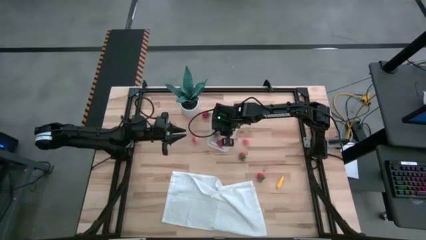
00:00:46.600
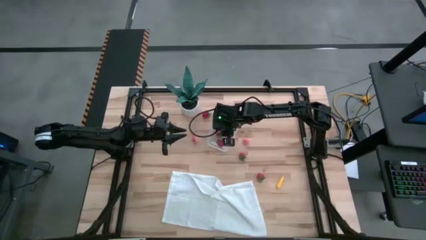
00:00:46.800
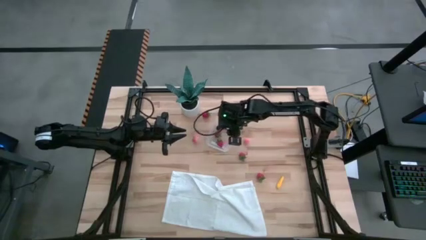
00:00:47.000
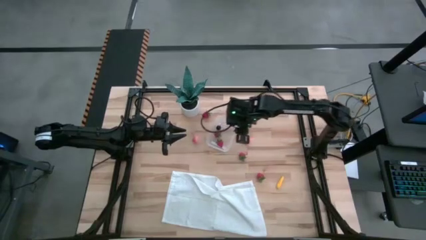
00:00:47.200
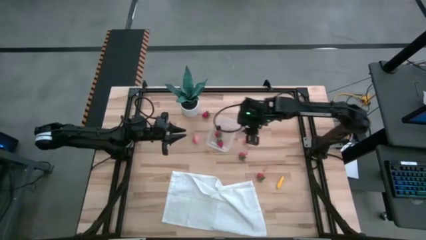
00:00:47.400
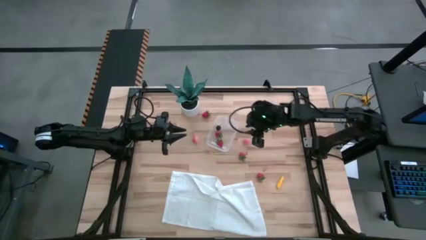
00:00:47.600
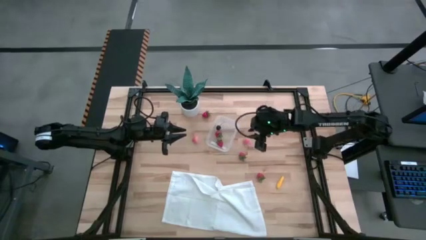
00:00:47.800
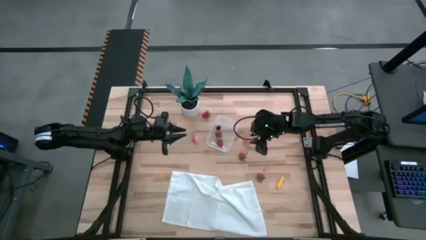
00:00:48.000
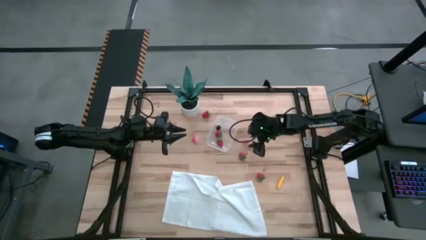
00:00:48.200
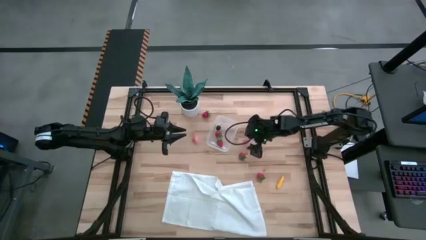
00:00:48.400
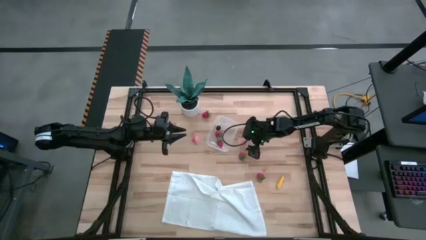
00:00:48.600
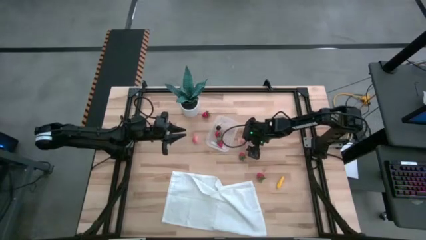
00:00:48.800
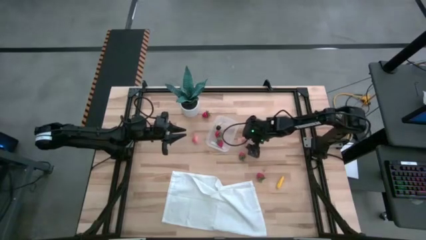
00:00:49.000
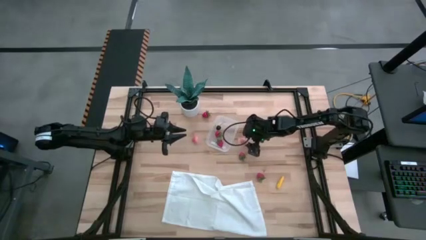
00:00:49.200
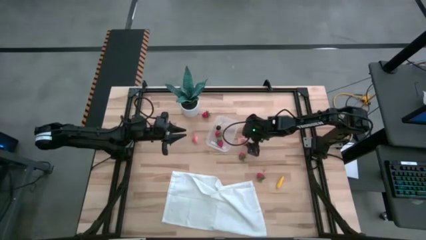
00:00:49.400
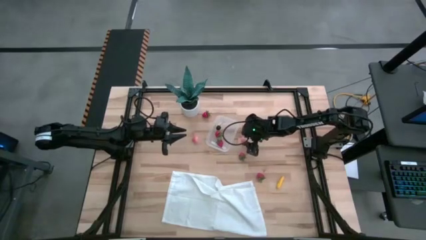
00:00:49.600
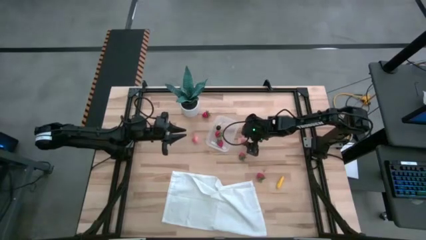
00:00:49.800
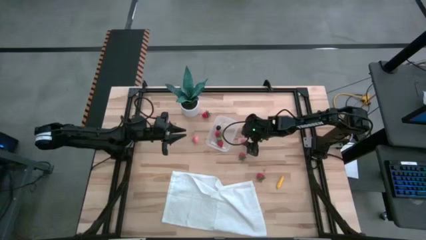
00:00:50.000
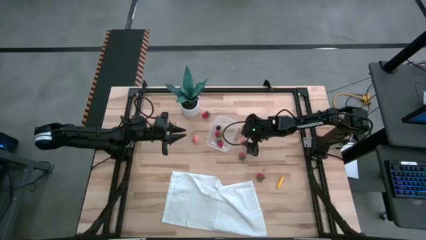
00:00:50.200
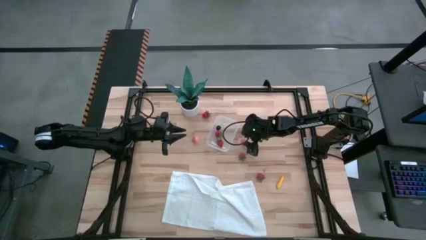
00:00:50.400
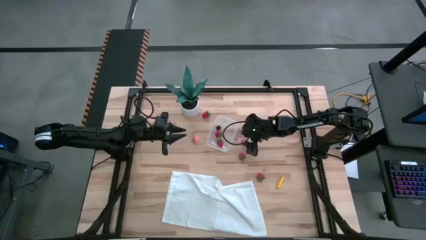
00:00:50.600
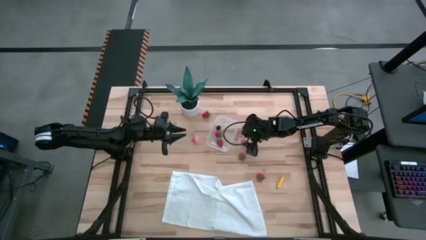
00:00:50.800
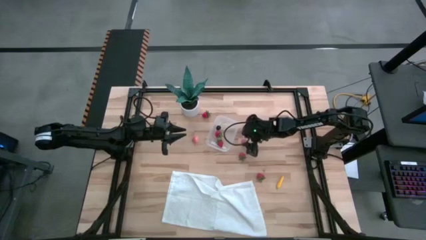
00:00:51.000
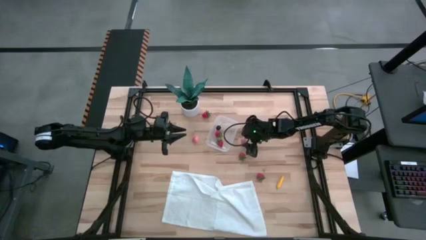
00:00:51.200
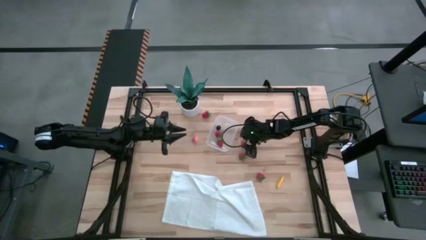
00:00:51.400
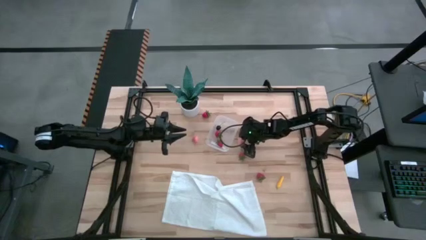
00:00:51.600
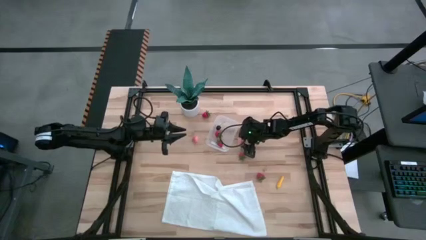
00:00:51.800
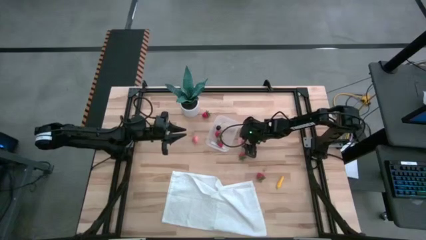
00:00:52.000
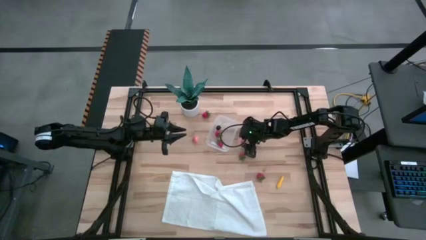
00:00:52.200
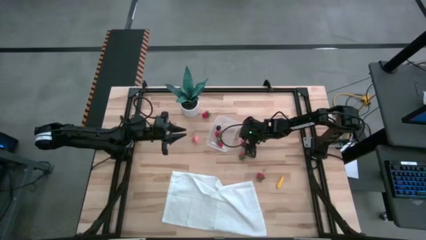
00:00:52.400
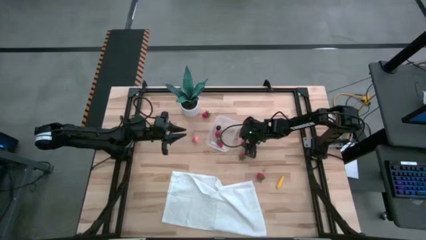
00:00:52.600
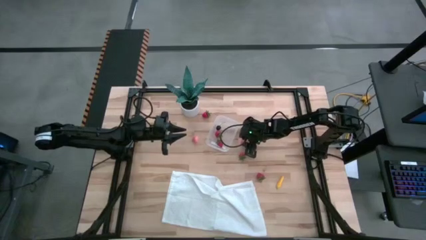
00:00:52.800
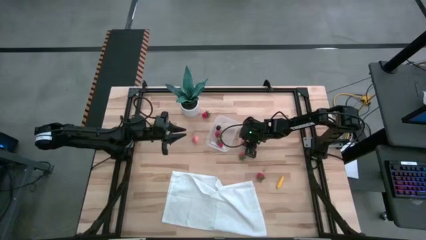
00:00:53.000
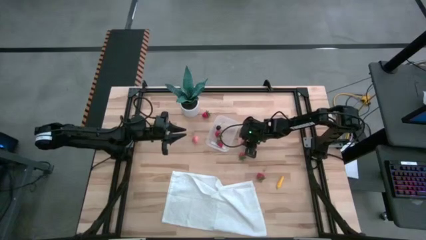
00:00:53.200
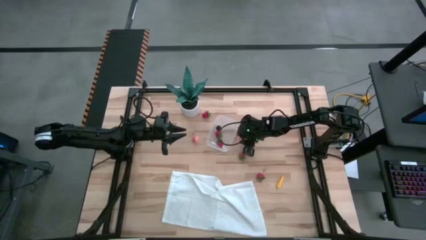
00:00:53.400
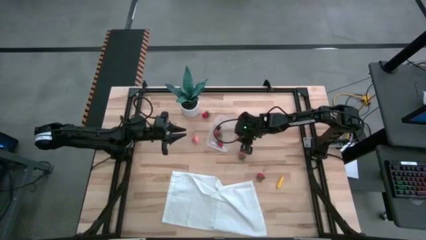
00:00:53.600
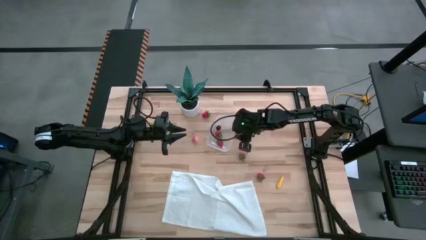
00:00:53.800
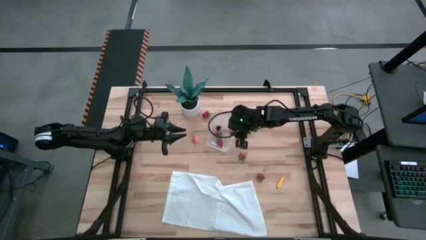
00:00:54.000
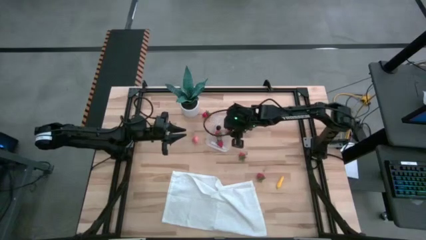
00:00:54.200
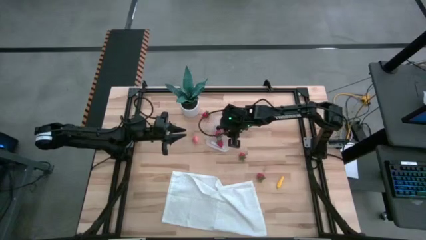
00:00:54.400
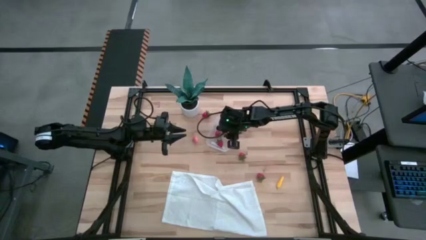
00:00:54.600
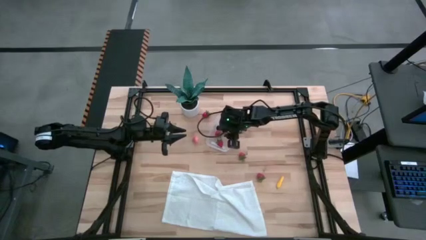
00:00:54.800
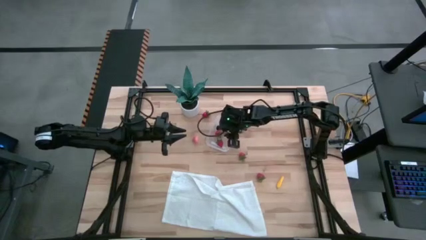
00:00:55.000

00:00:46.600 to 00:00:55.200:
Task: Pick and placing Produce into tupperware
Put the pink peach into the transparent bin

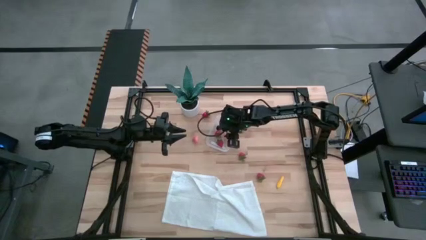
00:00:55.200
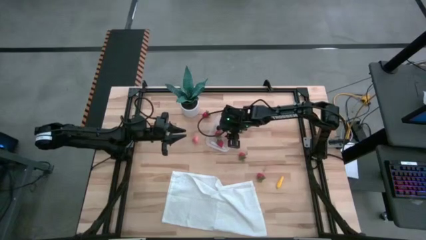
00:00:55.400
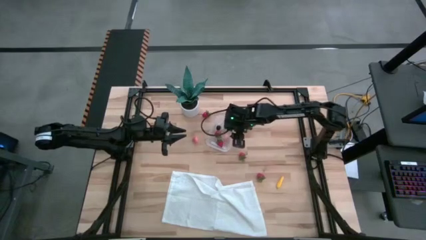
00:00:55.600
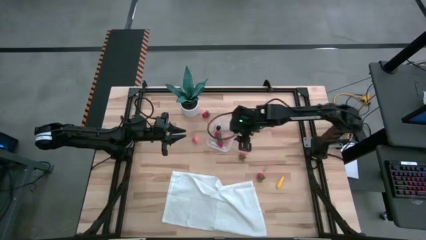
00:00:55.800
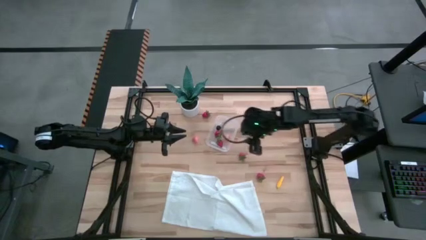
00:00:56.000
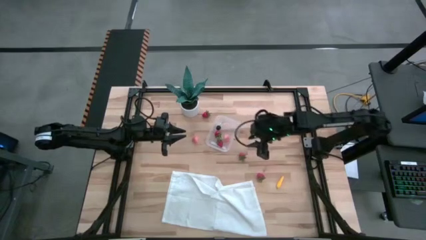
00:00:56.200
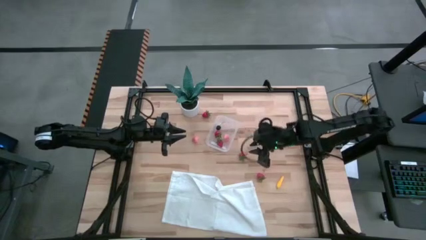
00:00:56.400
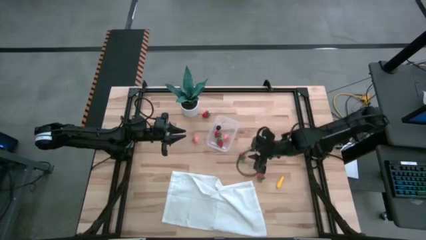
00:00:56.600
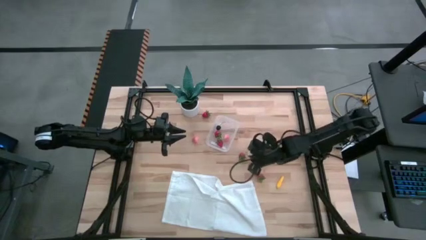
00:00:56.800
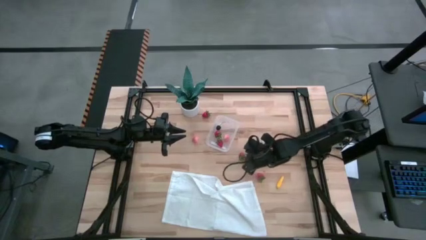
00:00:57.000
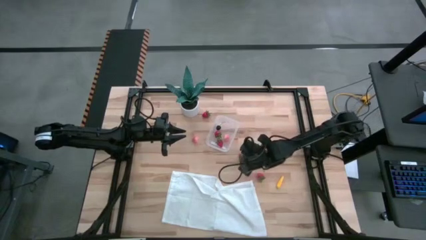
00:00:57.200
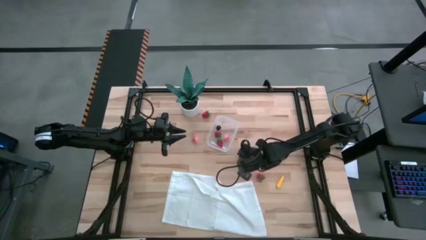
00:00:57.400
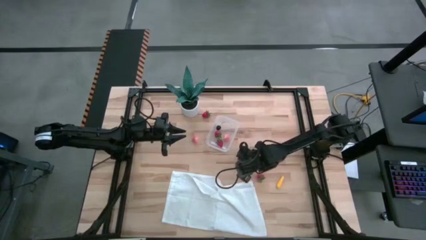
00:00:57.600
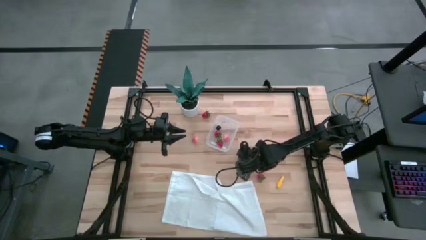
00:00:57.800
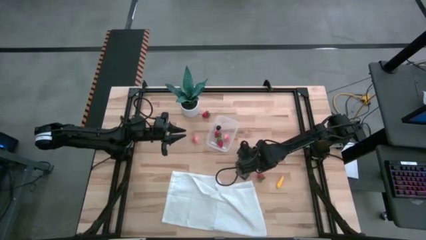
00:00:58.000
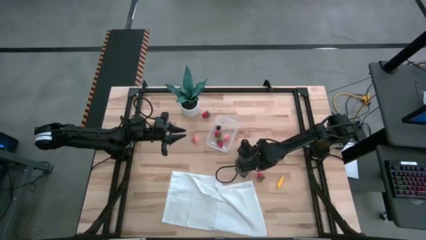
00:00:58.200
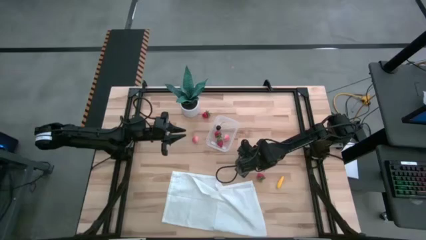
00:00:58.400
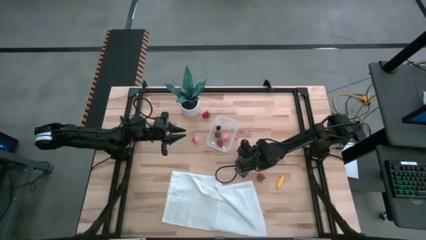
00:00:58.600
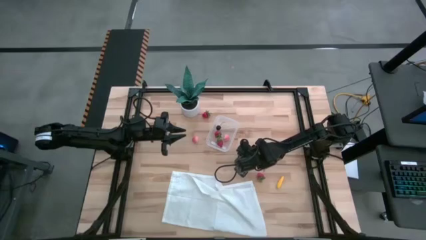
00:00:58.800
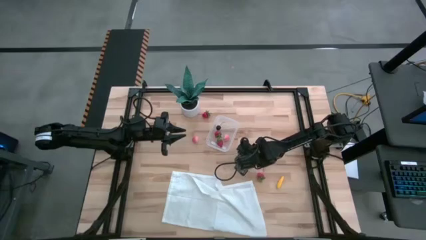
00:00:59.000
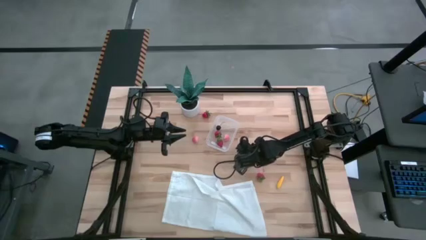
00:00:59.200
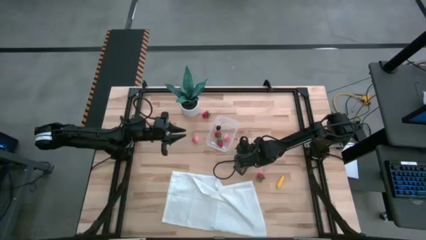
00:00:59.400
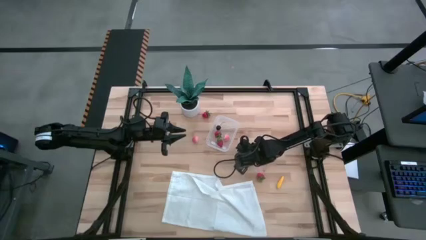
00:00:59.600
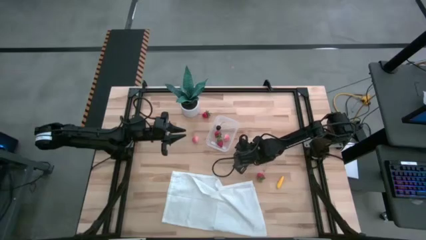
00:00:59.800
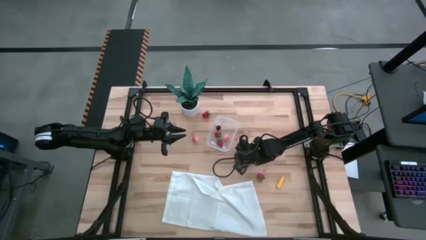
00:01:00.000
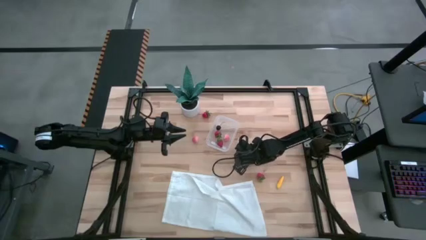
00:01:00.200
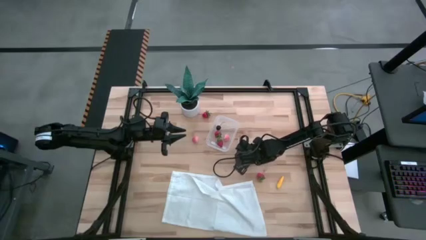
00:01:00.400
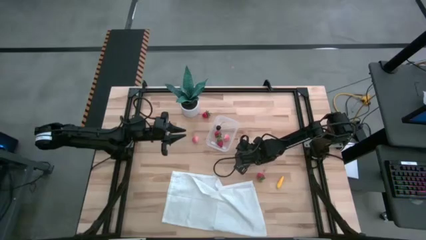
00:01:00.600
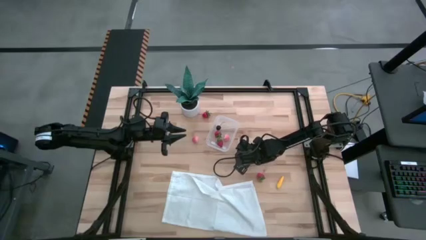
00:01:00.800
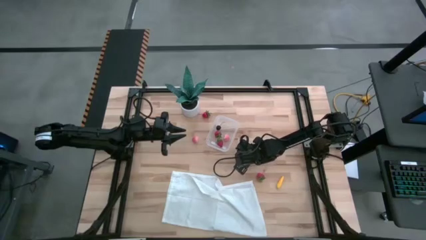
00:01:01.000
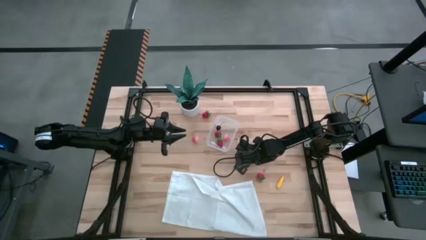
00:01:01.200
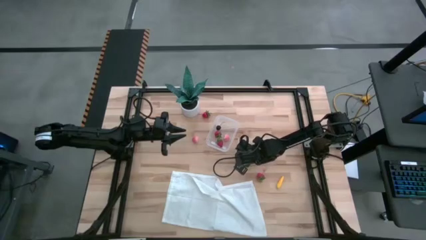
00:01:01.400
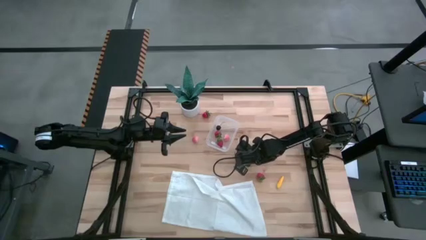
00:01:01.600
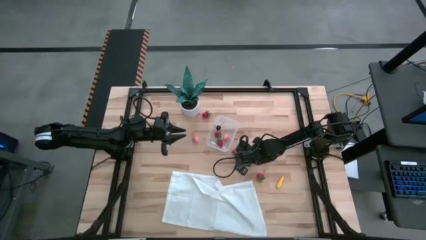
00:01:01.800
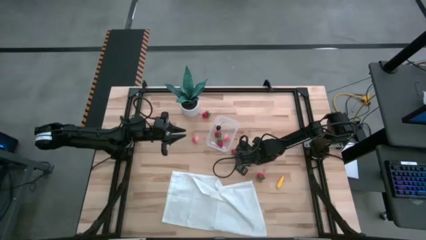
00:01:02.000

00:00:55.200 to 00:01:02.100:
Put the red strawberry into the transparent bin
